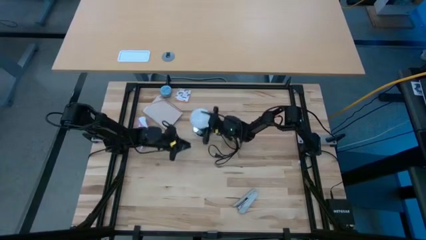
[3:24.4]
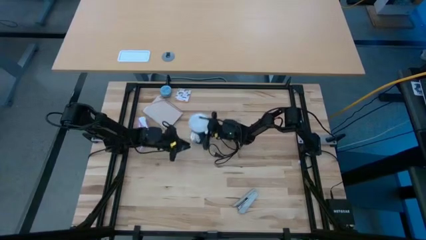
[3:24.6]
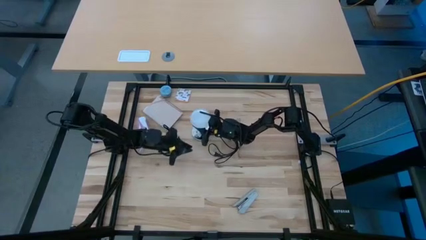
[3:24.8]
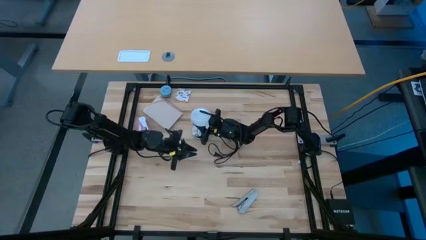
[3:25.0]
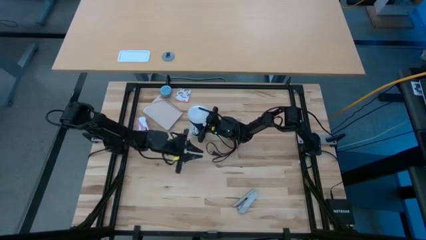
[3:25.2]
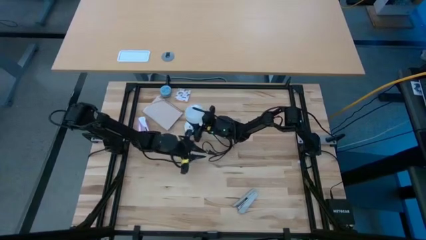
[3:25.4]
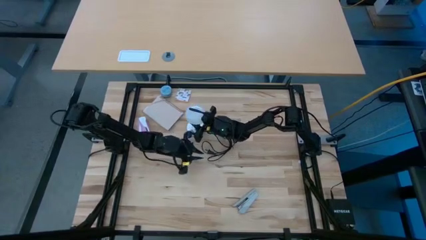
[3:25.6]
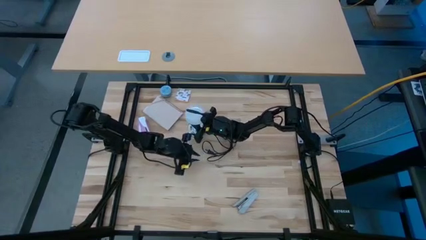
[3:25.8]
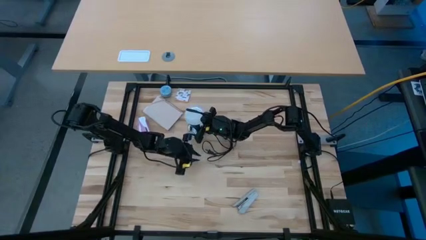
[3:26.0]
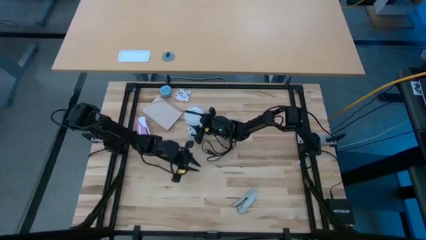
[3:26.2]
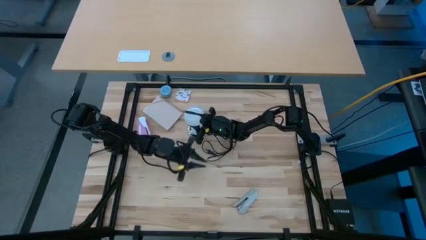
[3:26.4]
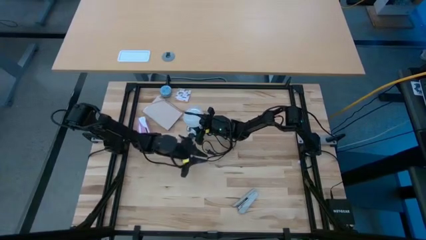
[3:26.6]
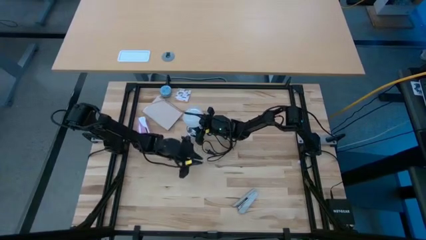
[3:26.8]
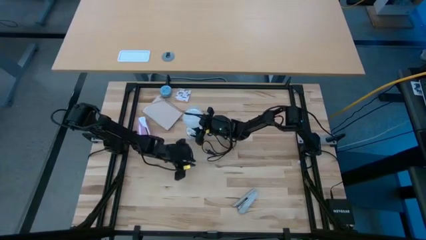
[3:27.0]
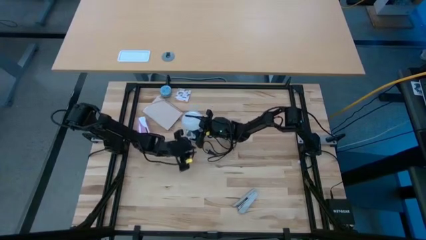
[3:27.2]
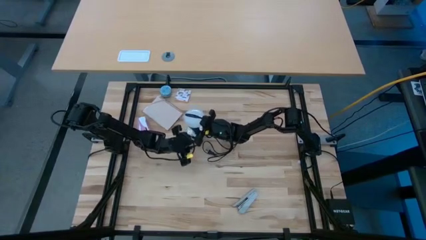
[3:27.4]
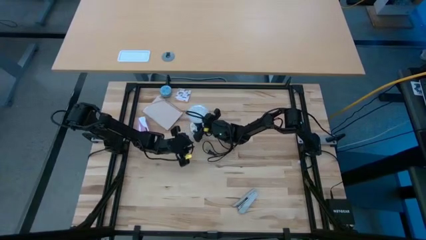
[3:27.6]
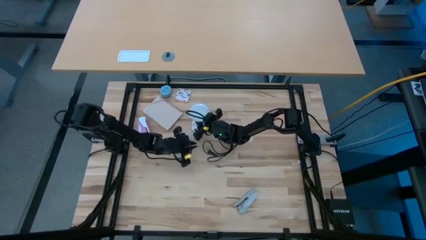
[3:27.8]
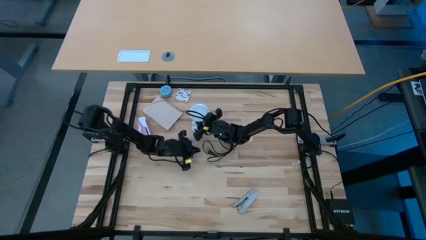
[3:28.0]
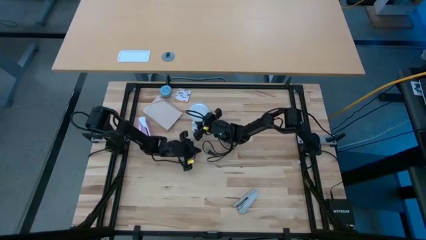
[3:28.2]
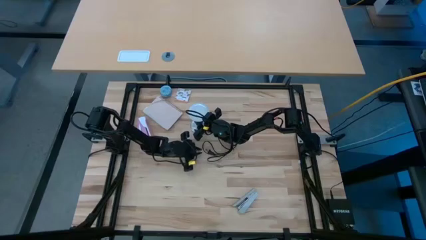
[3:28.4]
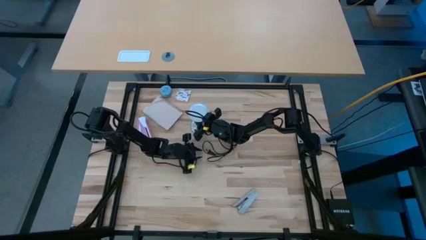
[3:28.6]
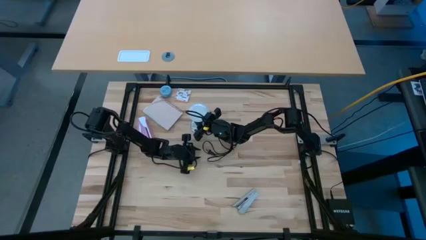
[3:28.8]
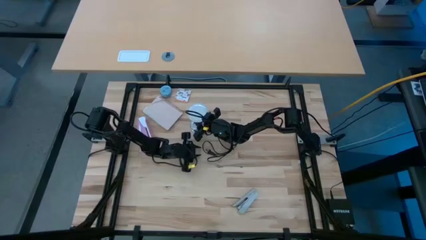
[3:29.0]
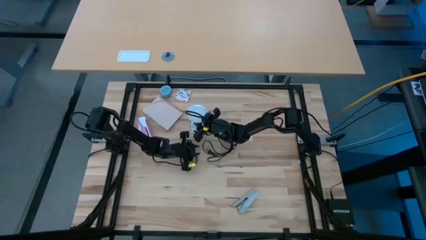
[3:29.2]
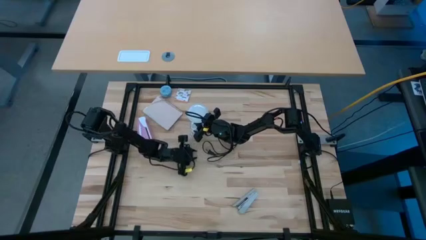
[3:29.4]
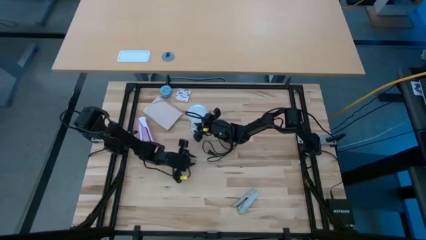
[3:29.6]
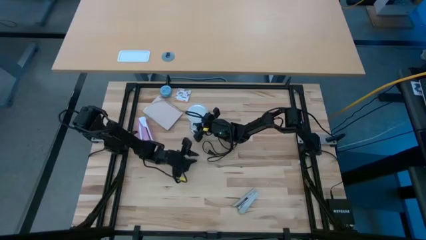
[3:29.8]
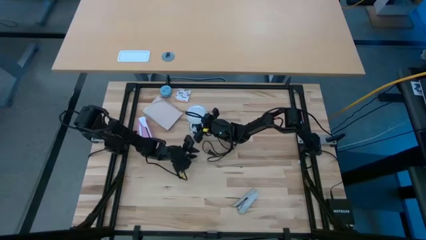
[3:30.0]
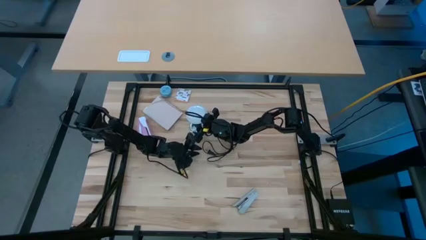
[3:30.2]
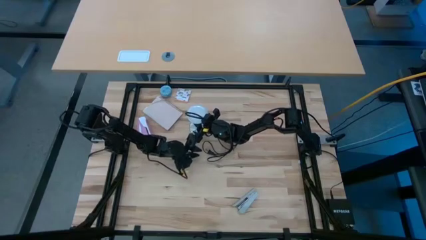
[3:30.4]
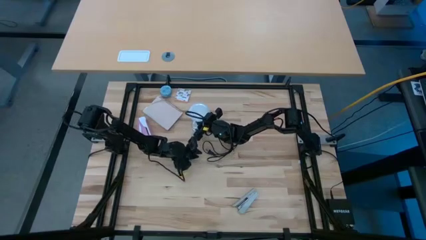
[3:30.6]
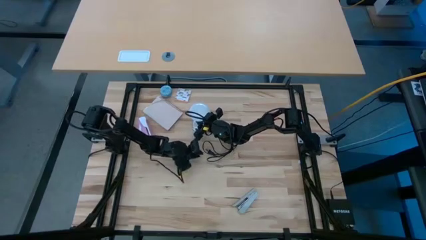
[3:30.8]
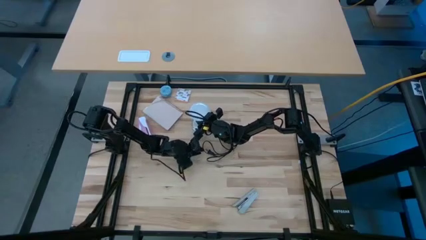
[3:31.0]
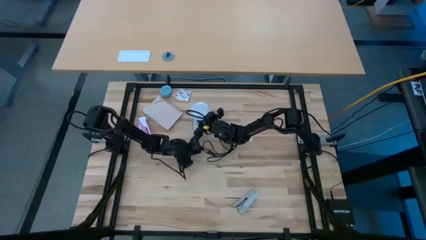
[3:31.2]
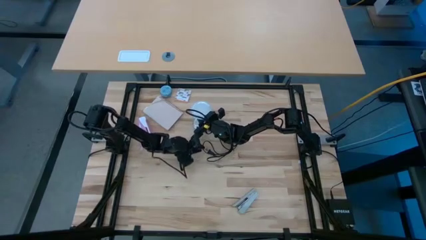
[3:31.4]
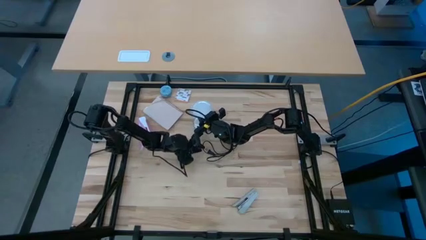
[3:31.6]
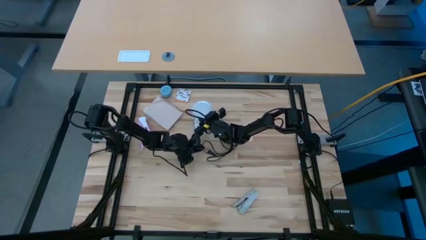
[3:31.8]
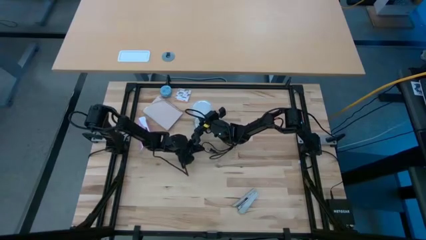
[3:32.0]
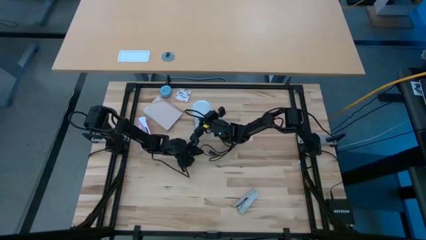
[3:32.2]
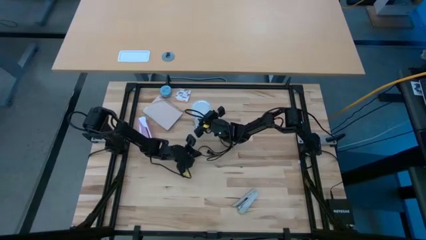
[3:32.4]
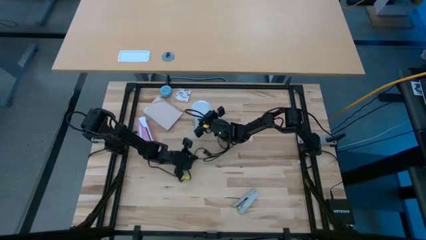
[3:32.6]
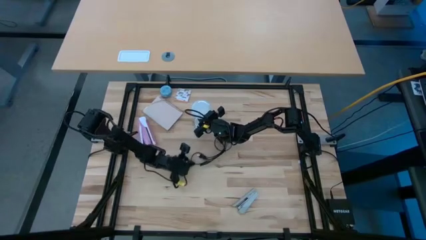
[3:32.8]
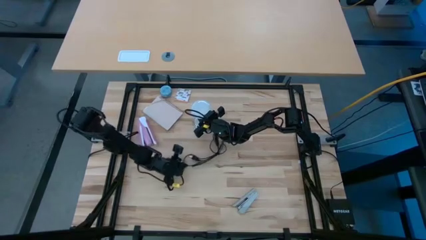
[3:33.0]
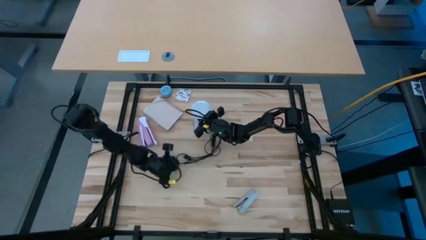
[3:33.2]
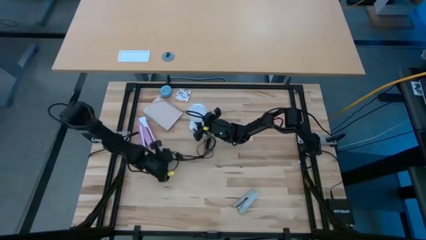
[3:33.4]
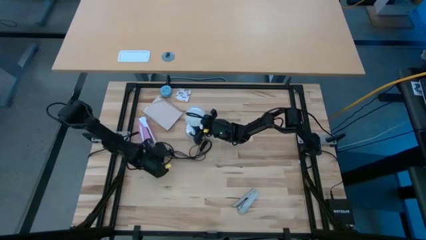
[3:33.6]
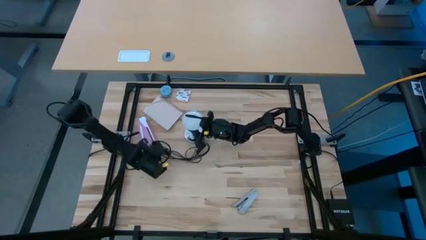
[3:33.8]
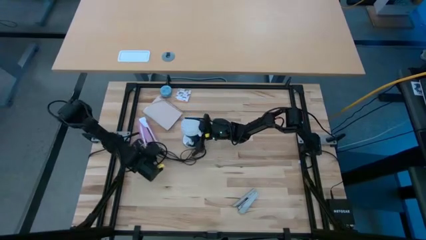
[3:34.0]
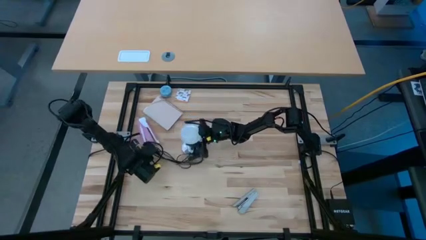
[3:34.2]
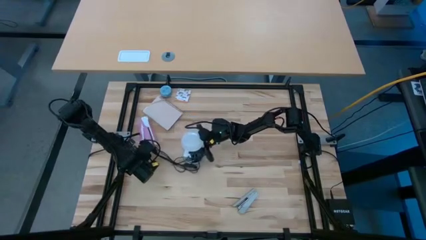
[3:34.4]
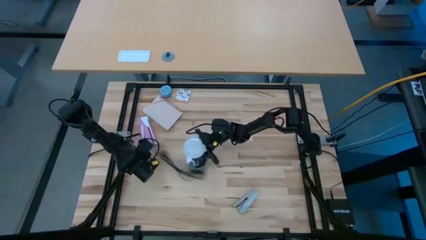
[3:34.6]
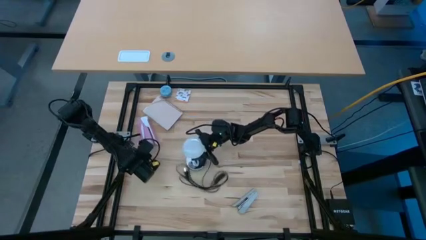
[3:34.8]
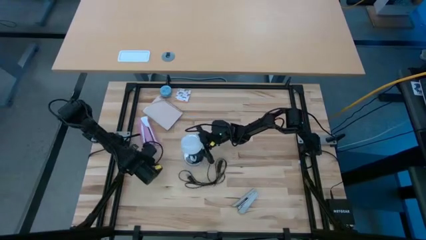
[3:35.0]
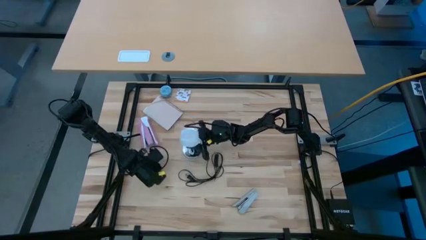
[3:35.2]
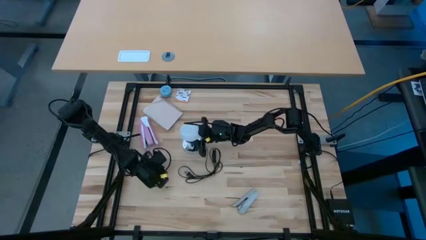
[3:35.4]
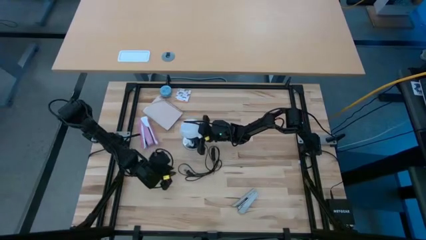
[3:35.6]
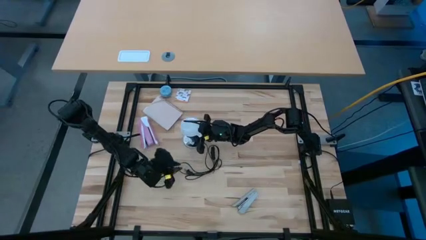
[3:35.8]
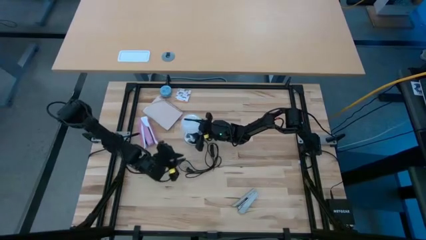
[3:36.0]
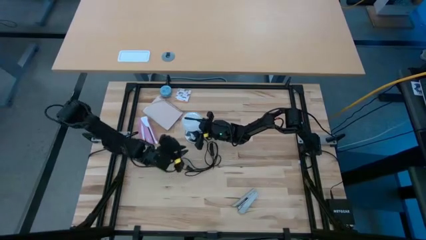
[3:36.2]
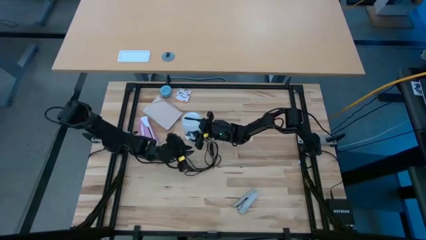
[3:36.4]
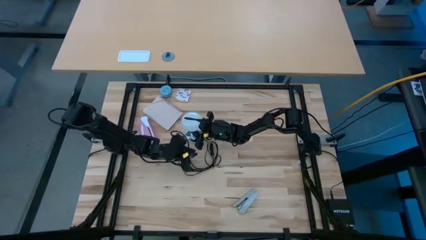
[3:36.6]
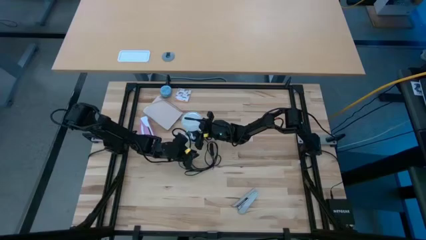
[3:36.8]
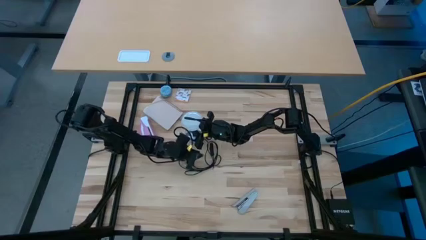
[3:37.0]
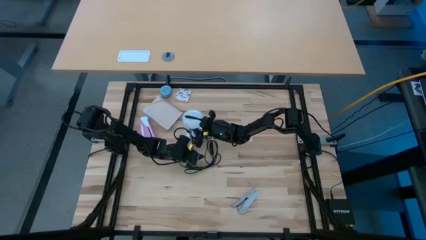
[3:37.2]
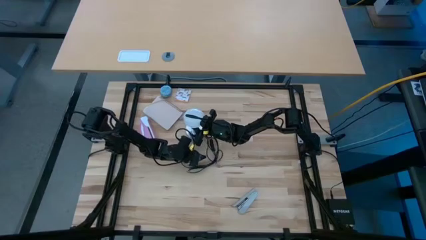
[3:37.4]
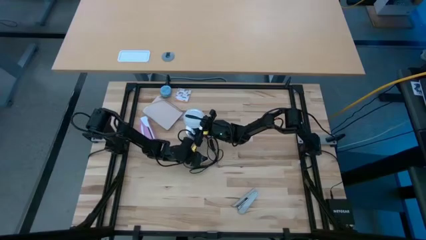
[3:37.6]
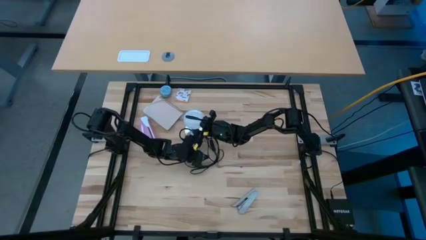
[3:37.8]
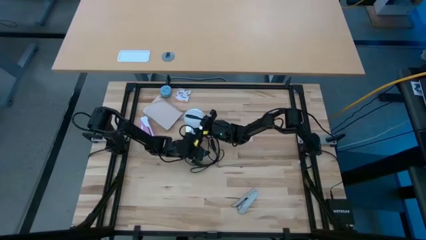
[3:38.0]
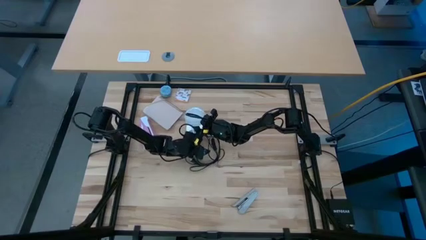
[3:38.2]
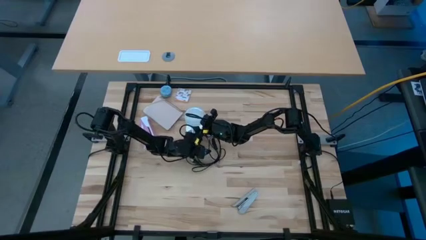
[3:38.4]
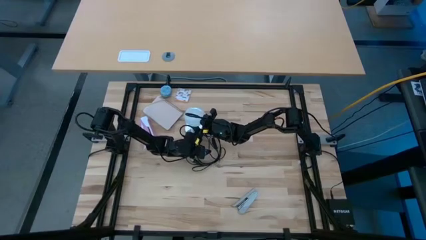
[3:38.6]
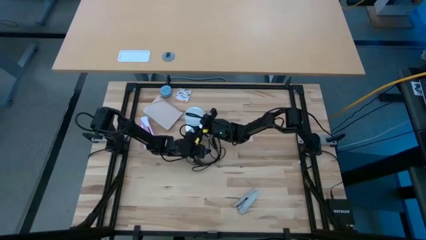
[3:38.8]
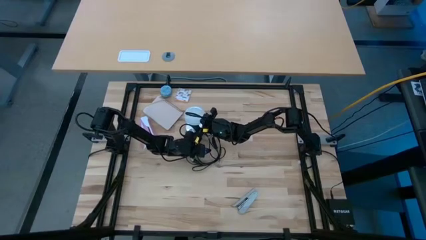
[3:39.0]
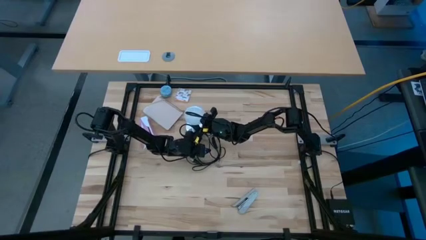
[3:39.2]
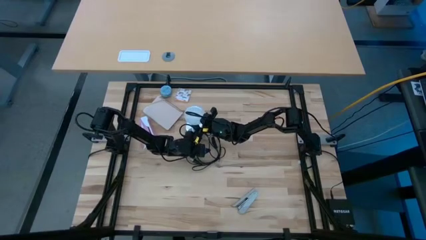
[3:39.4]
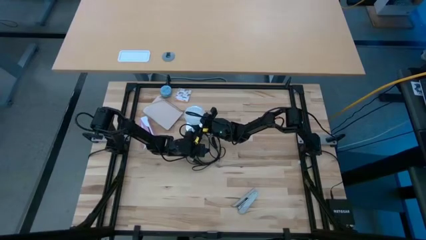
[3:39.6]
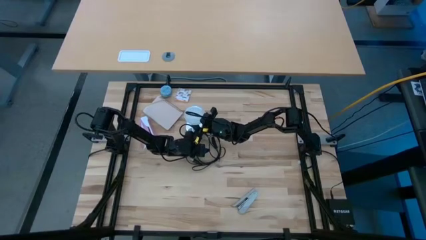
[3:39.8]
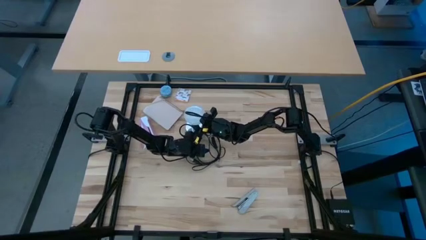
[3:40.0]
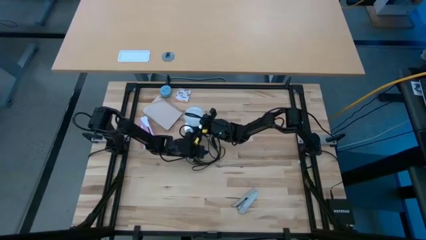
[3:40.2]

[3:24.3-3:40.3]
Task: Screw lightbulb
Remove the lightbulb from the lamp
